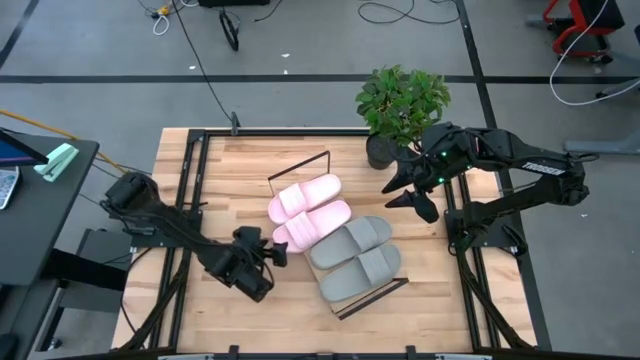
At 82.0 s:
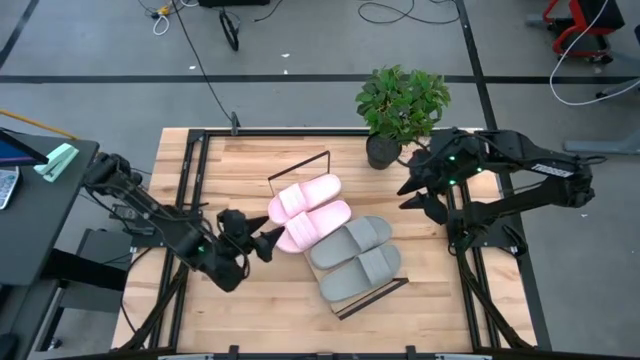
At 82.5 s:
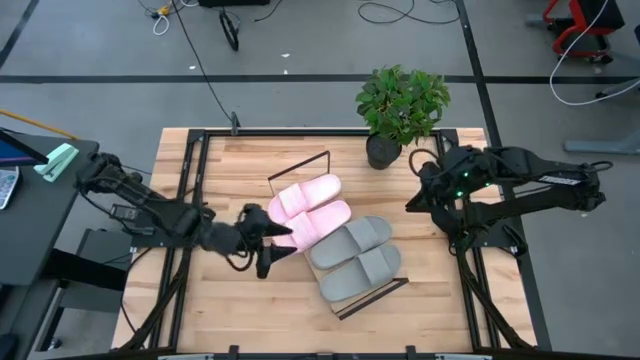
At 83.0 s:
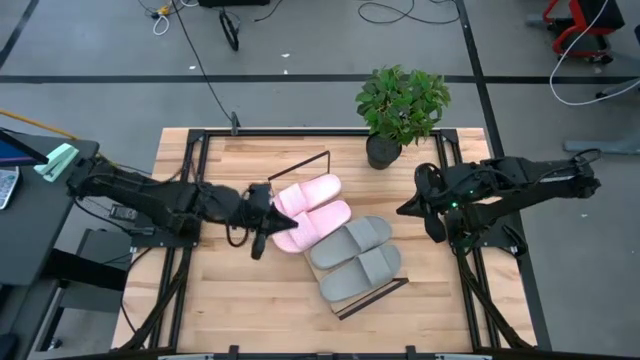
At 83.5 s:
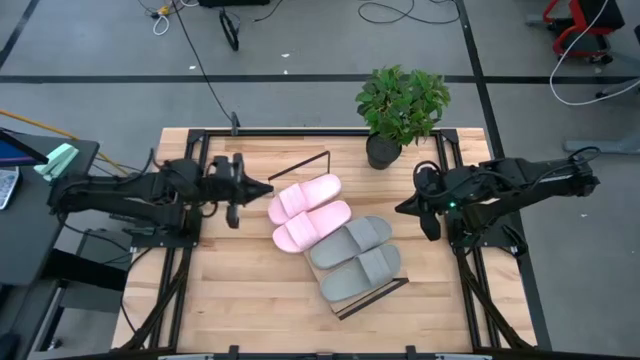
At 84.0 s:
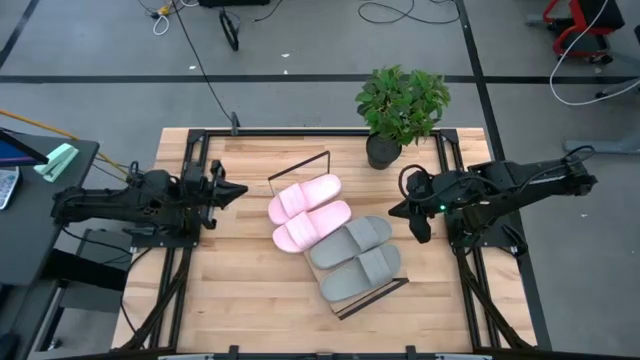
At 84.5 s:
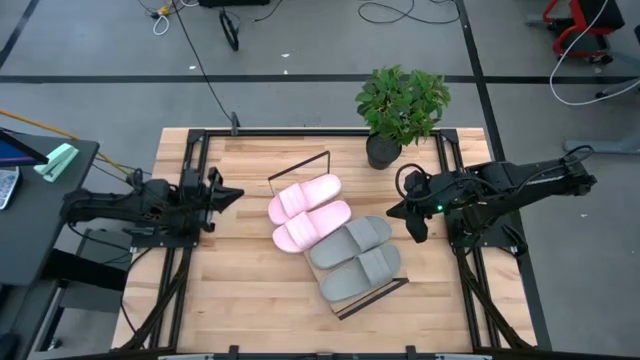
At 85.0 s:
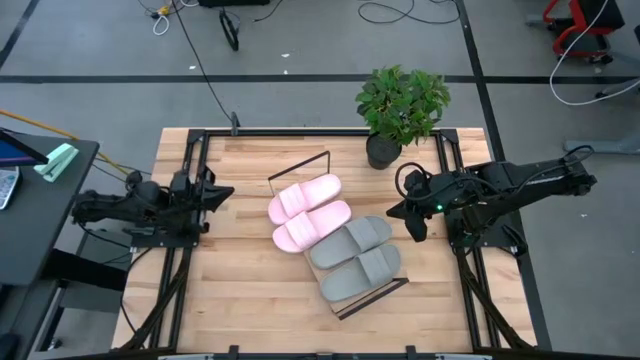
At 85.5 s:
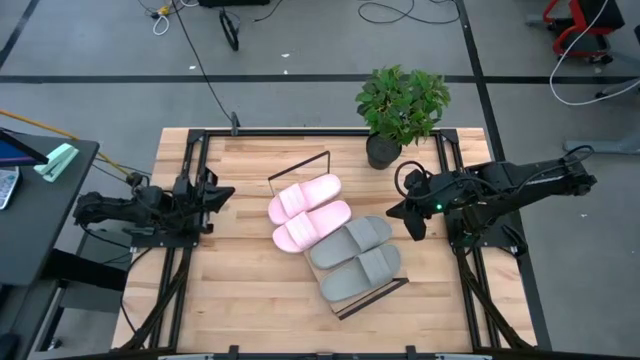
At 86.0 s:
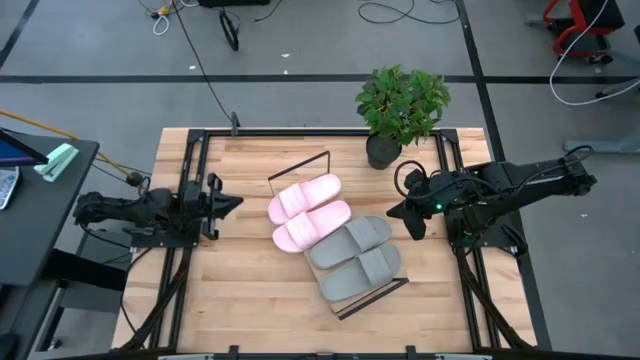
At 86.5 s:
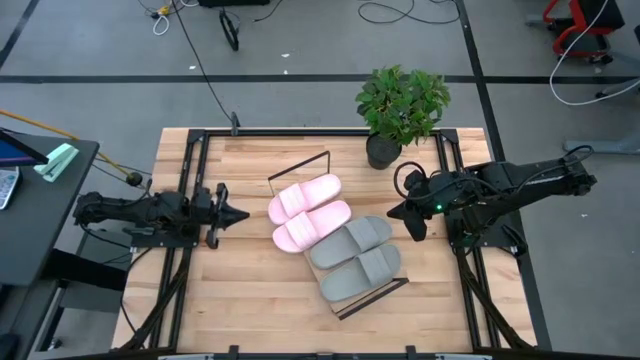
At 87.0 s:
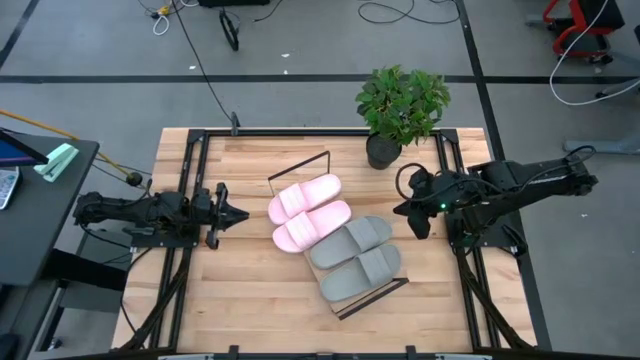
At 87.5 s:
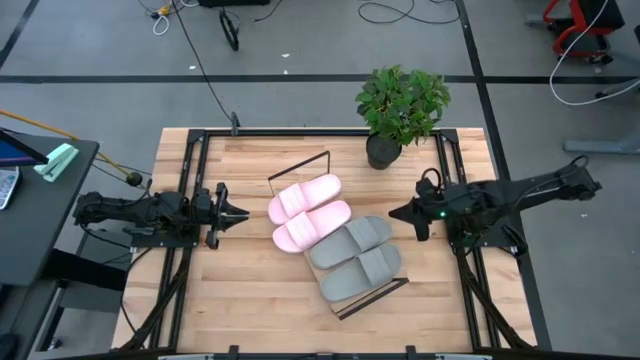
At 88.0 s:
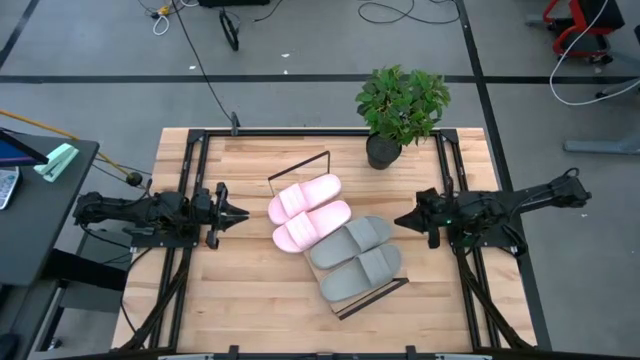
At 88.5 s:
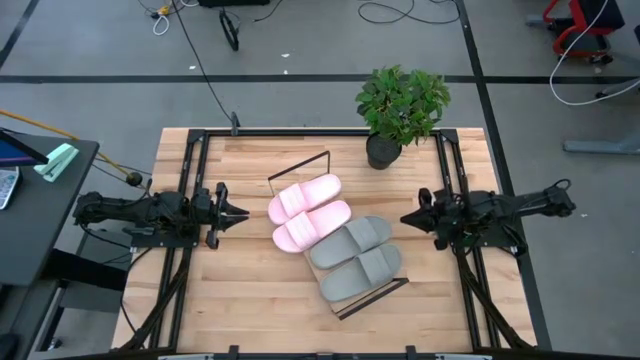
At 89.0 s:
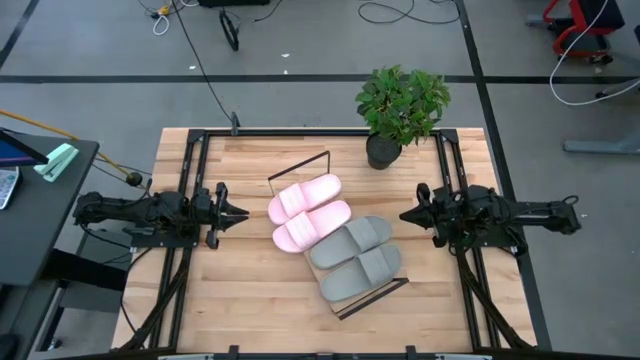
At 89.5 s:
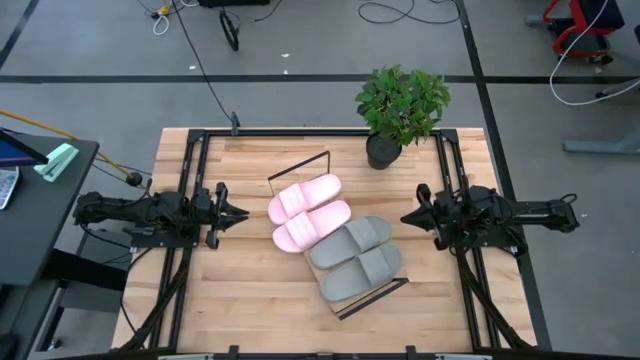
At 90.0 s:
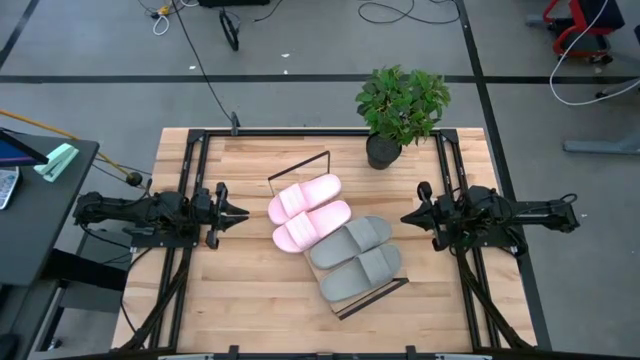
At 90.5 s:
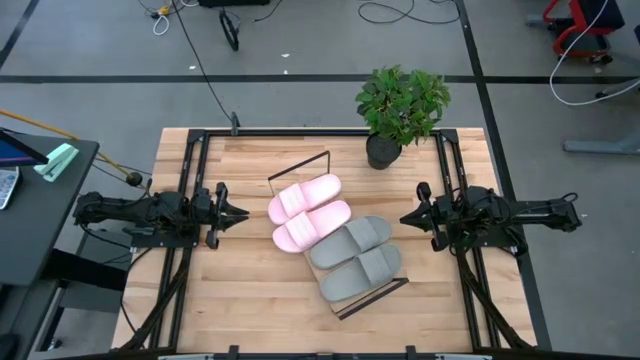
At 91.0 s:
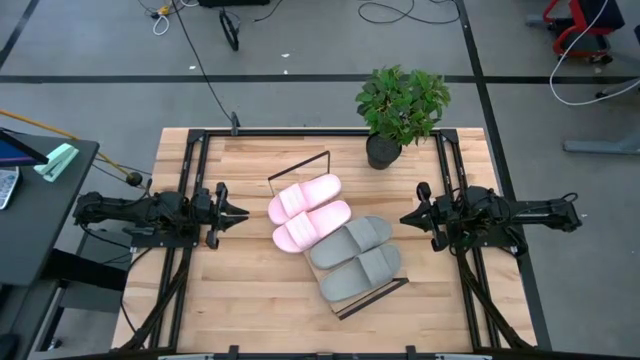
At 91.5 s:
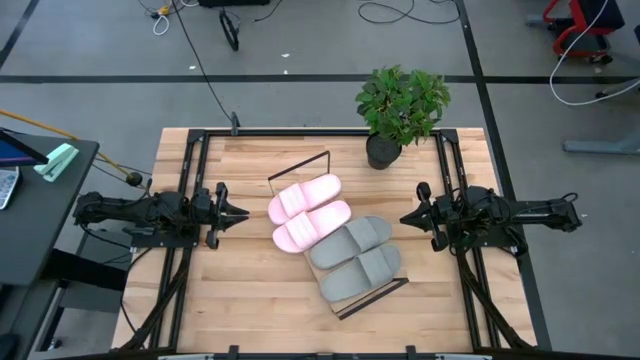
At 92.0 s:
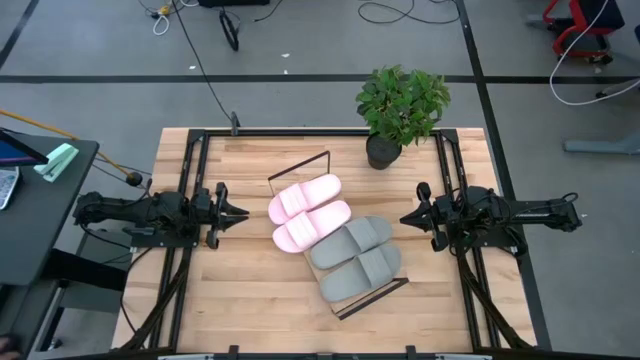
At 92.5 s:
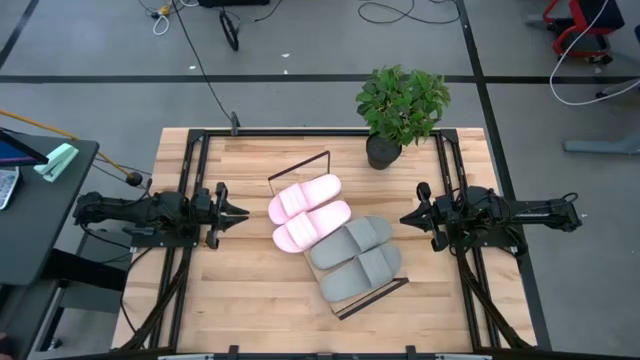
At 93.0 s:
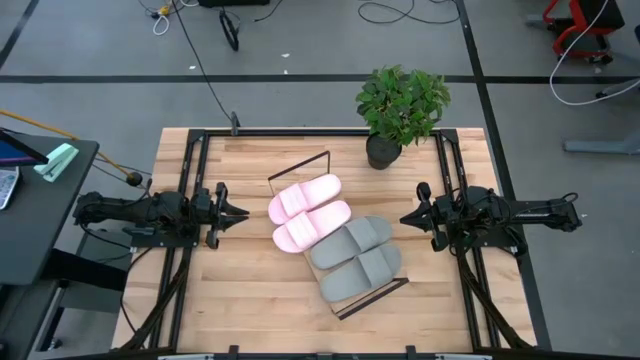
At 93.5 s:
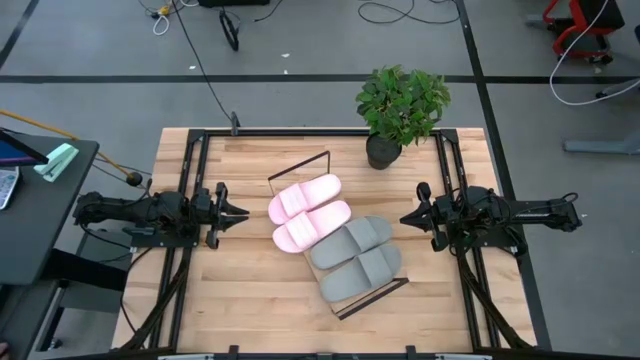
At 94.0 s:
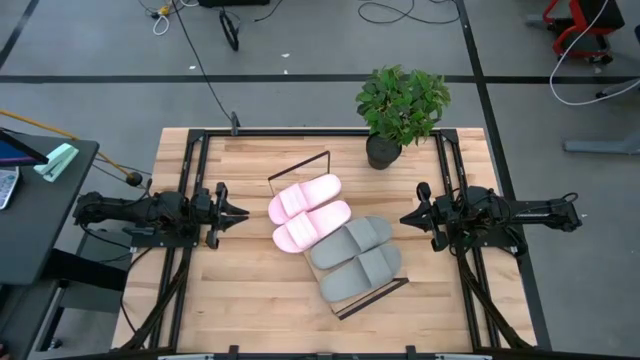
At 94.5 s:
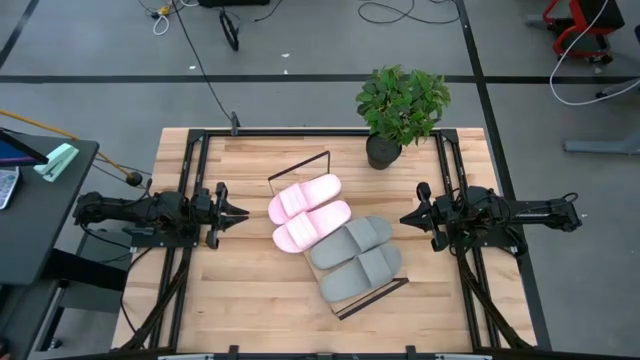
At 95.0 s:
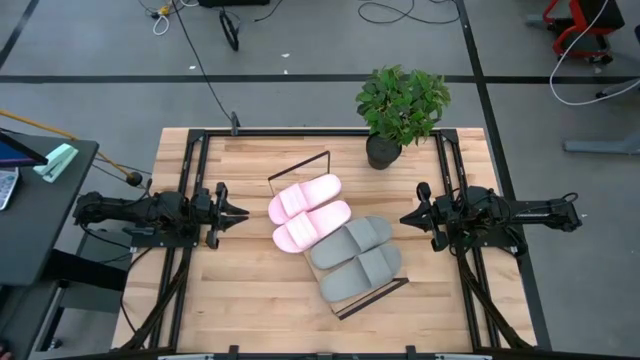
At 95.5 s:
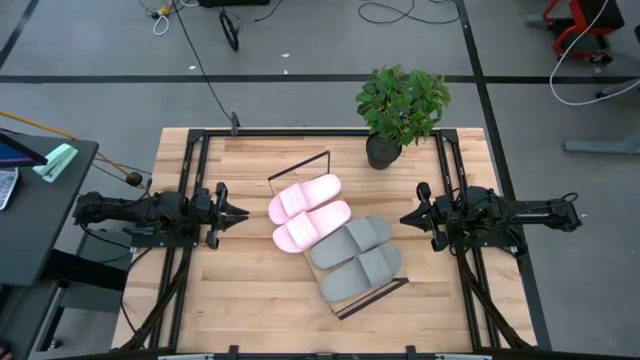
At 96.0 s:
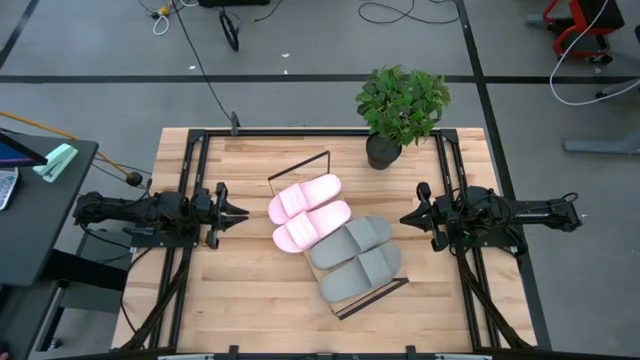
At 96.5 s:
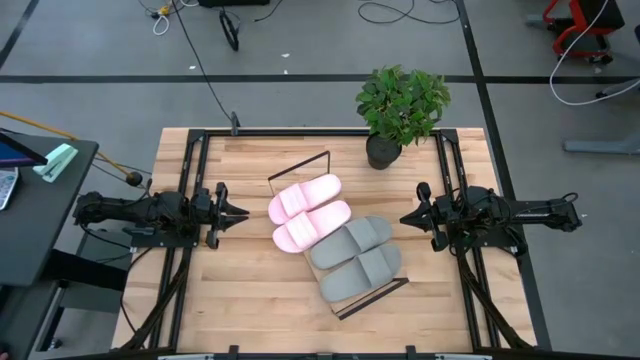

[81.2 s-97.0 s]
Task: Pick and place slides into the shelf
Return to home position

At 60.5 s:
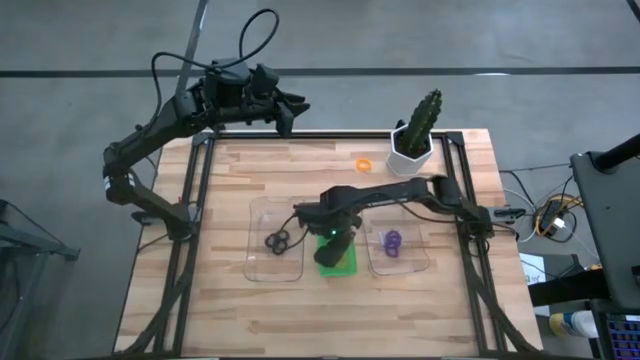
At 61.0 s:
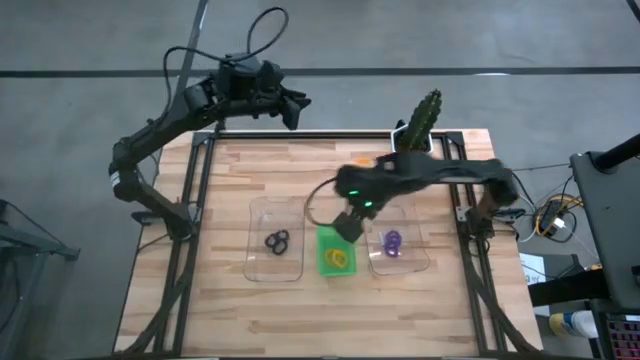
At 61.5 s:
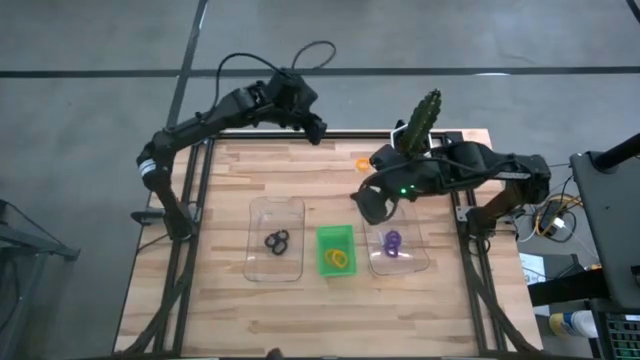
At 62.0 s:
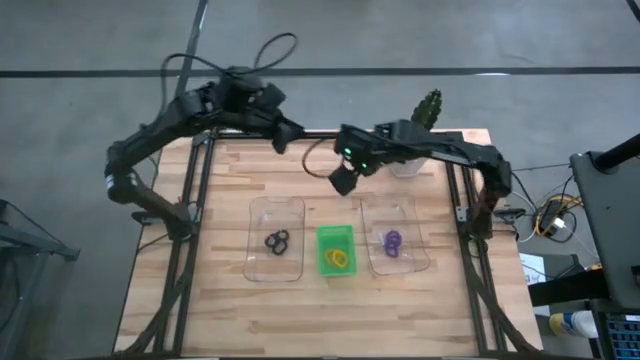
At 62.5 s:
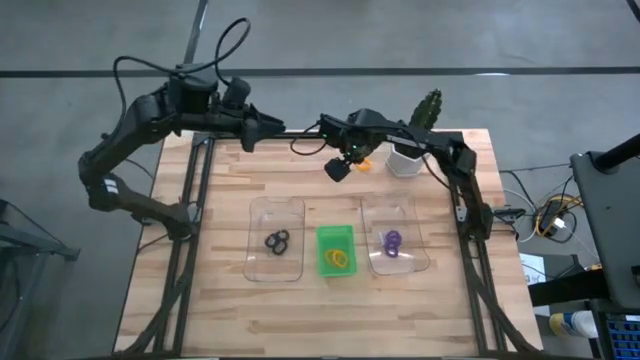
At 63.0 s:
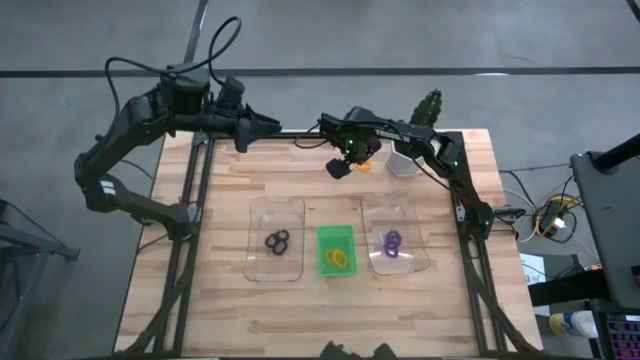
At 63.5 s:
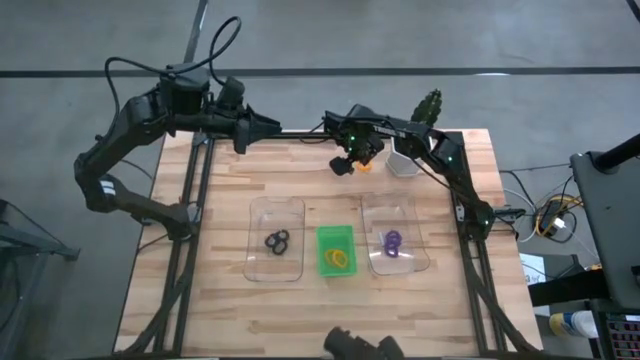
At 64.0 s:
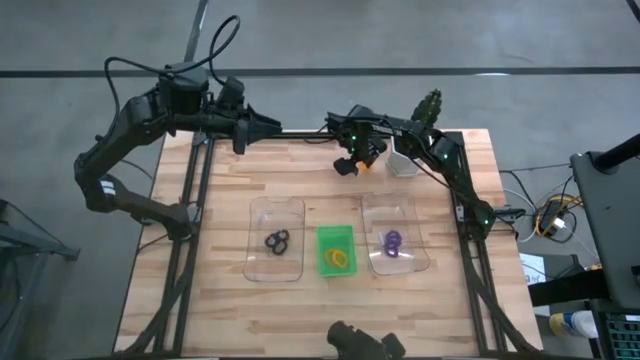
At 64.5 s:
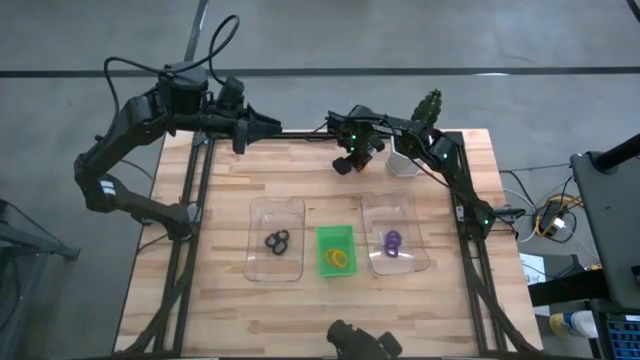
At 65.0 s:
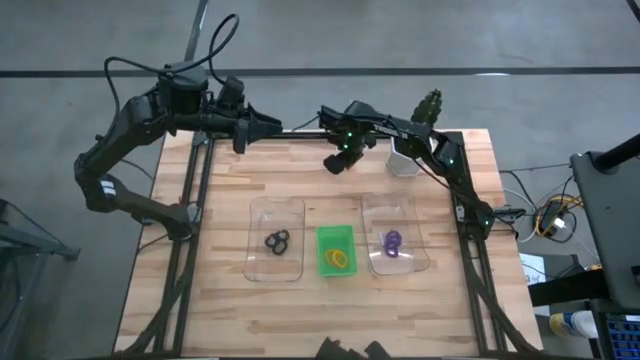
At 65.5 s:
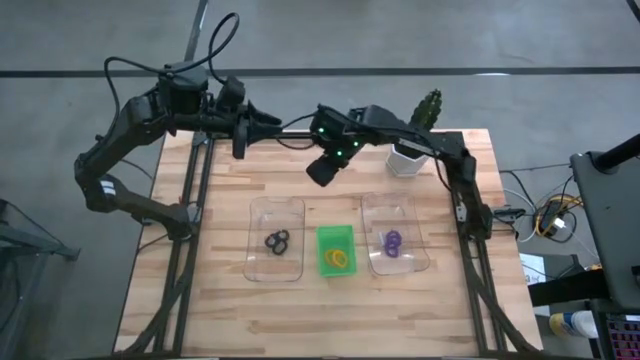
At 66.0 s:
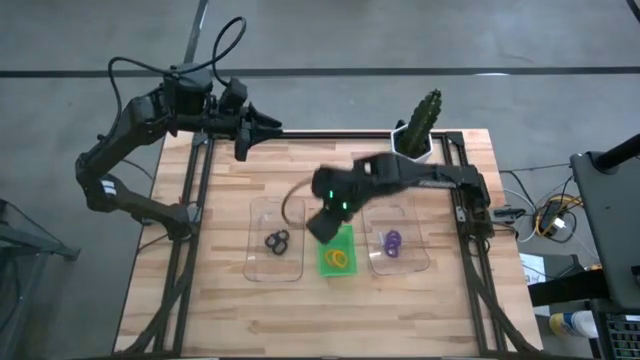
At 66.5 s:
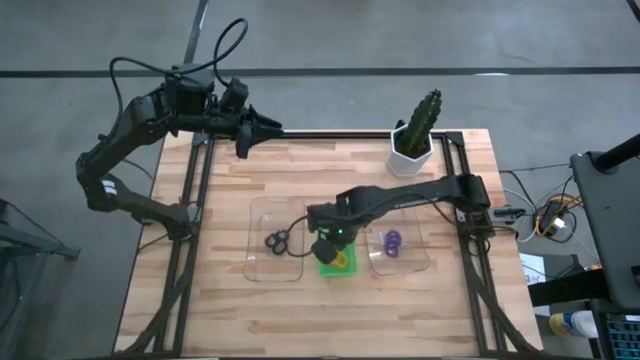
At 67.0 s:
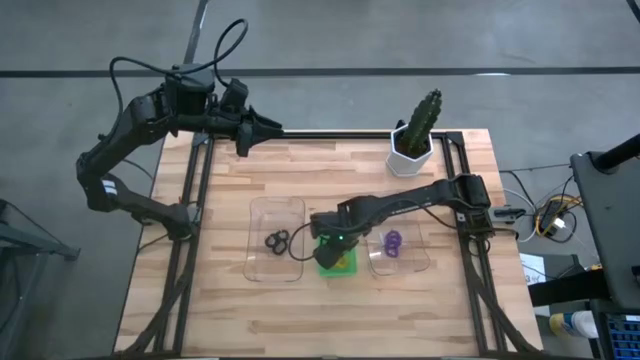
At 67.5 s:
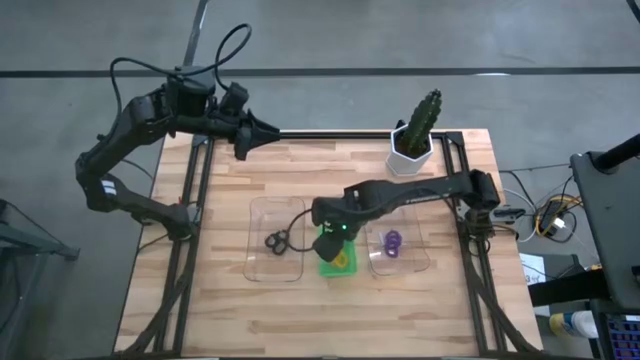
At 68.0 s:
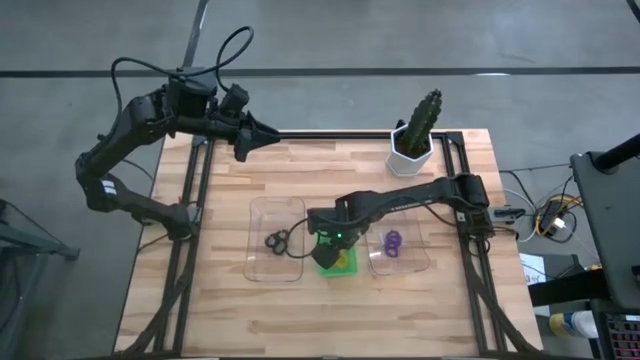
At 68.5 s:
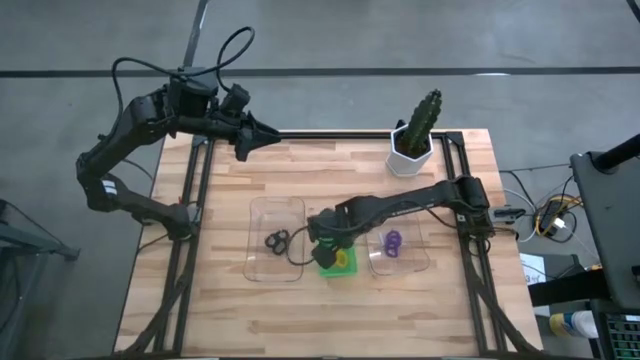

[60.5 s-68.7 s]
Task: Sort spring keychains
Put the yellow spring keychain into the green bin
